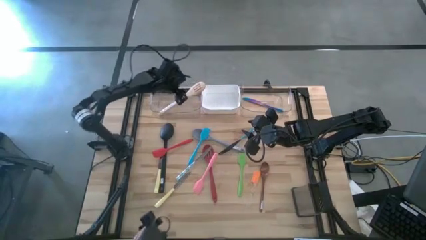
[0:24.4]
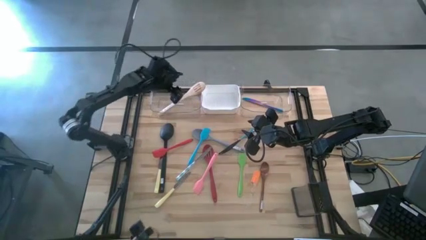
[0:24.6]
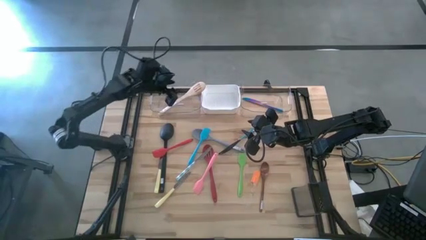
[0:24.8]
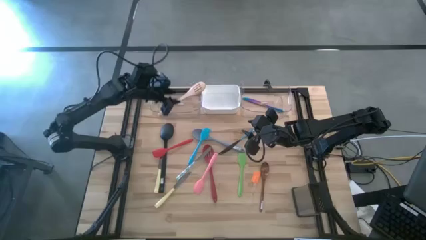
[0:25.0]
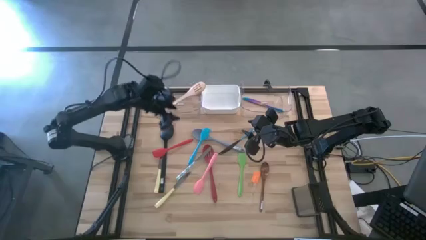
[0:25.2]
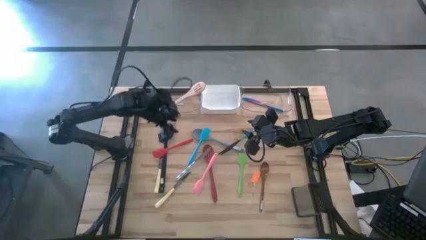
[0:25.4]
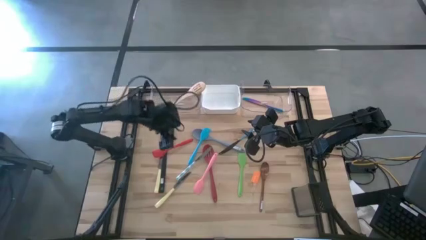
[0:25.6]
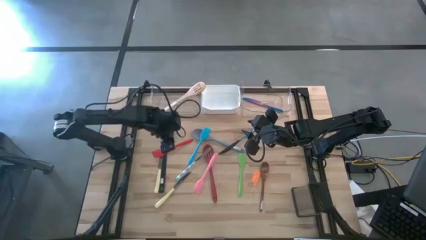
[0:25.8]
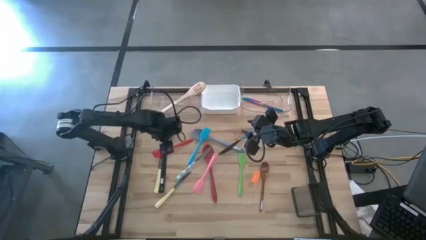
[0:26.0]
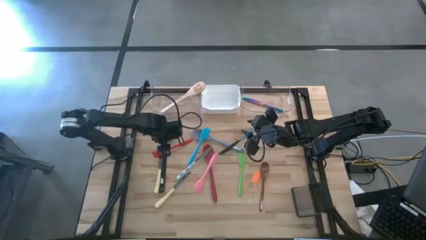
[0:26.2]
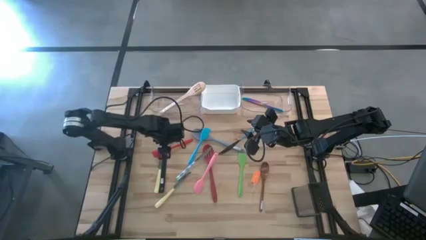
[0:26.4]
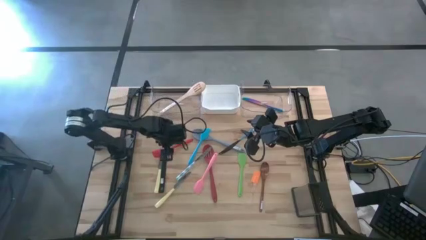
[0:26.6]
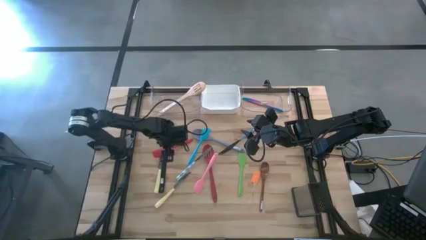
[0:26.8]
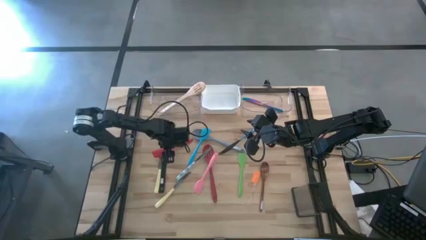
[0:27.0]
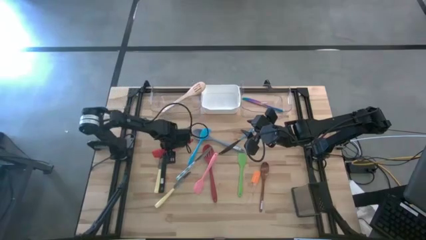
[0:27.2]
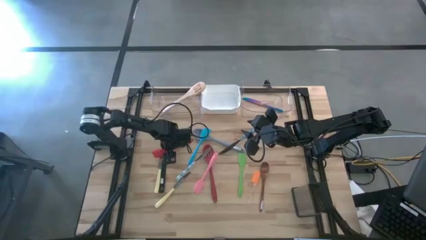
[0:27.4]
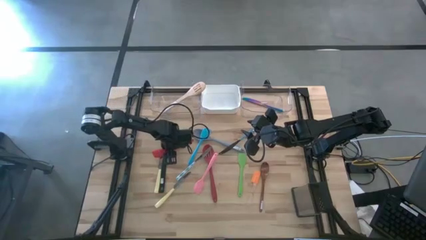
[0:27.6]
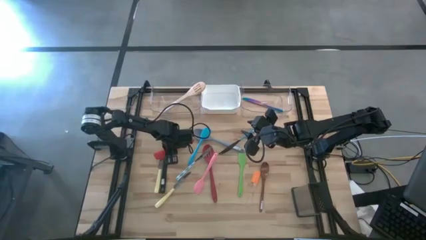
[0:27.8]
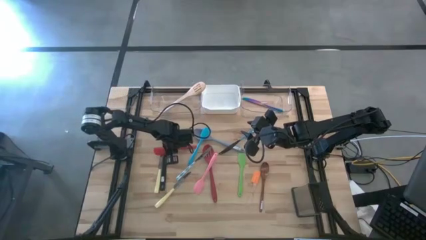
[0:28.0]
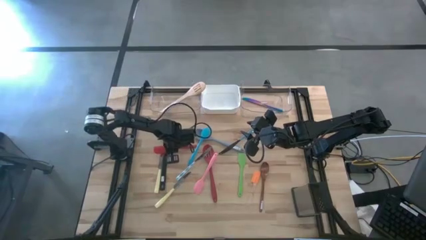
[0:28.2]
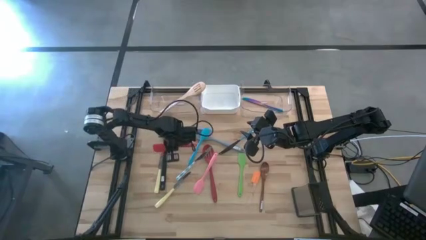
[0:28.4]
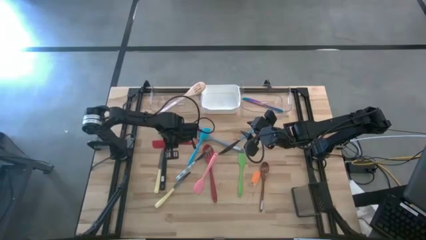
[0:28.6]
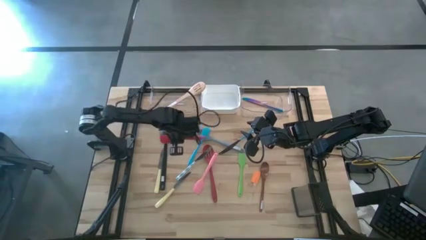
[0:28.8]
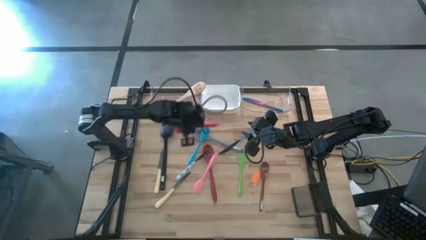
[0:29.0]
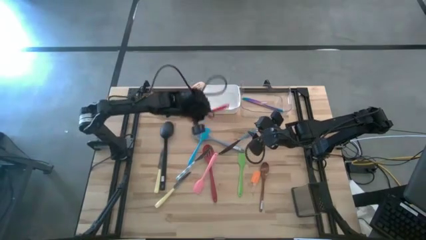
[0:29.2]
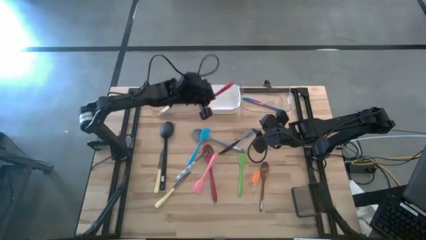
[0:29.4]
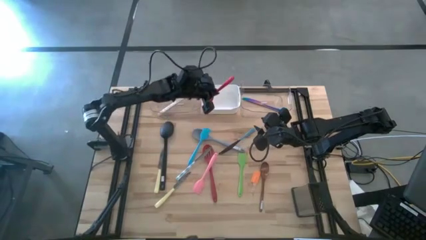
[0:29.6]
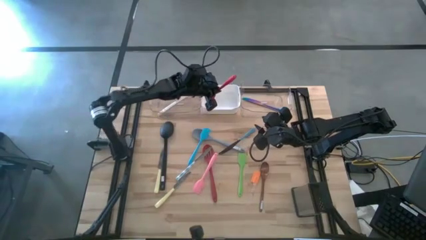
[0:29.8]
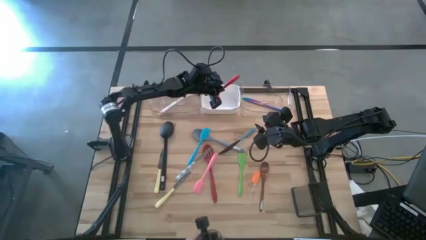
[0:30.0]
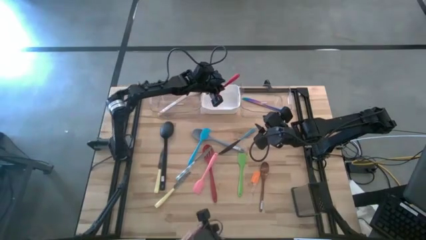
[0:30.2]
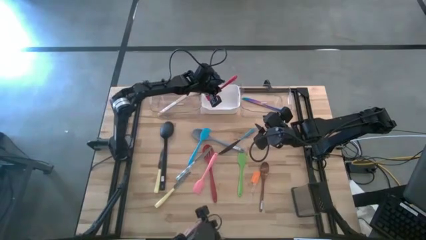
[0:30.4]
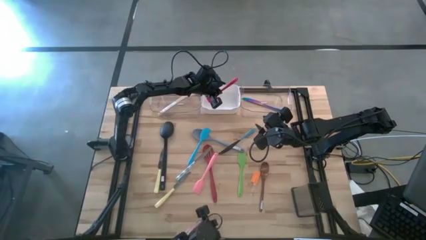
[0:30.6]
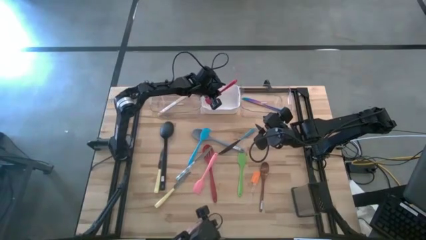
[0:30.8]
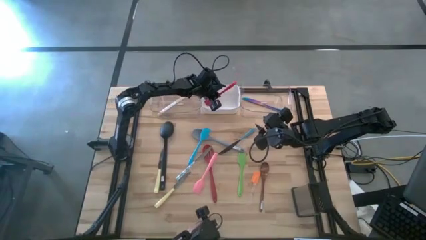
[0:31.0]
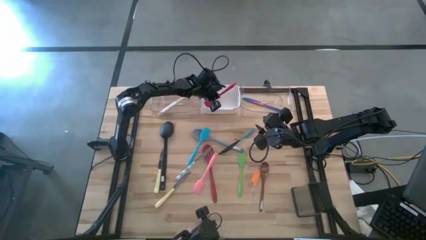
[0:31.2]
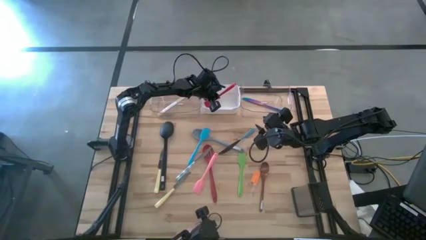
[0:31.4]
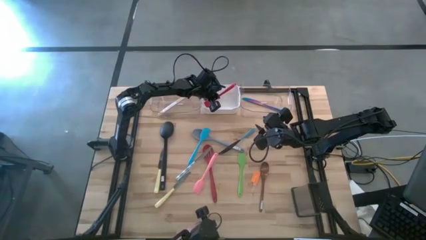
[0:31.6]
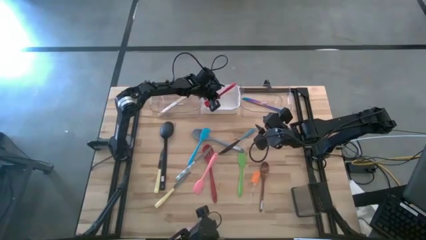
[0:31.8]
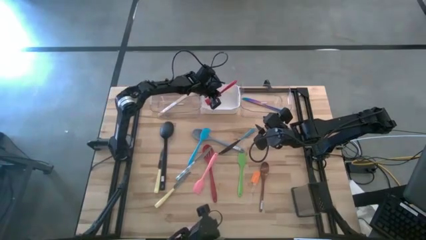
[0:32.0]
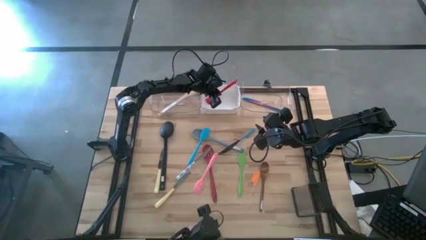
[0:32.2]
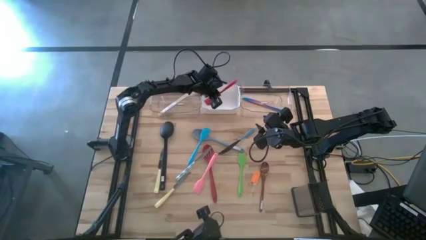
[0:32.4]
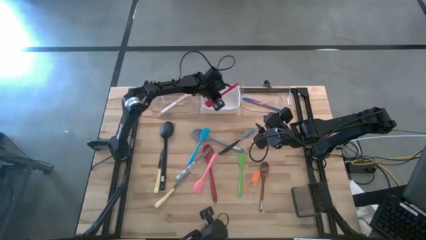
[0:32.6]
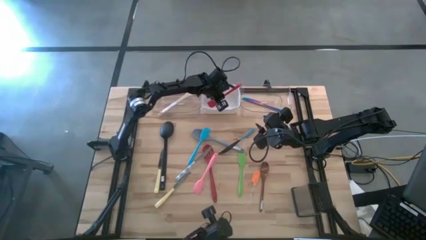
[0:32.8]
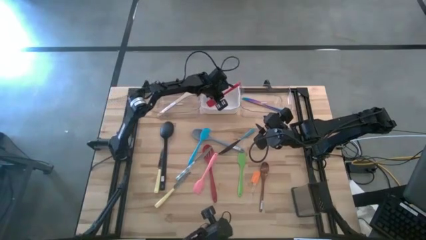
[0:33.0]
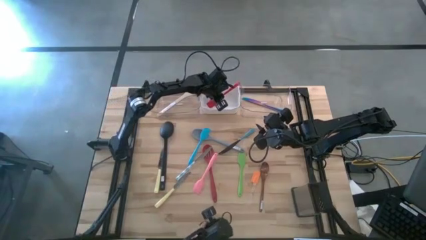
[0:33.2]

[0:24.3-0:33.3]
Task: Pick & Place Kitchen Items
Put the red spatula into the white bin

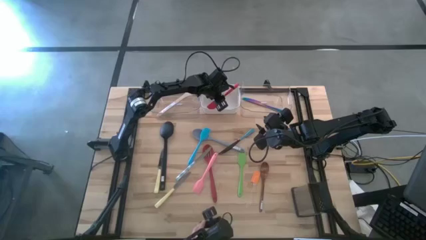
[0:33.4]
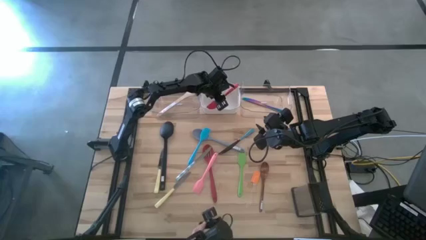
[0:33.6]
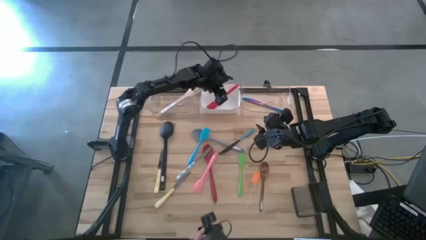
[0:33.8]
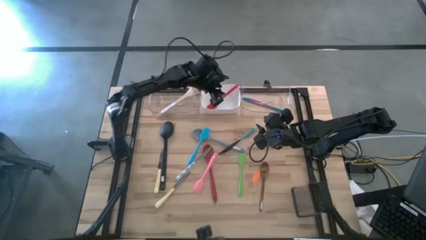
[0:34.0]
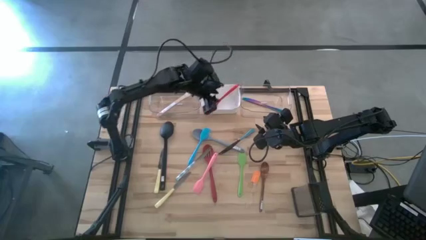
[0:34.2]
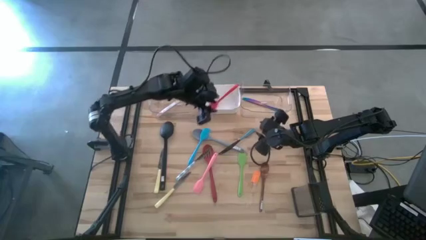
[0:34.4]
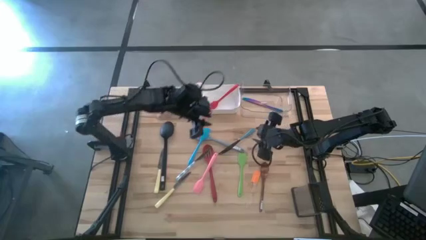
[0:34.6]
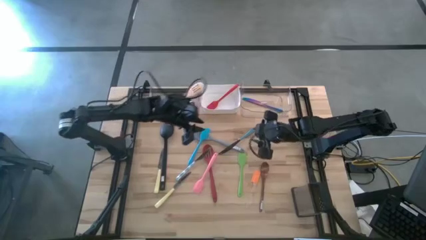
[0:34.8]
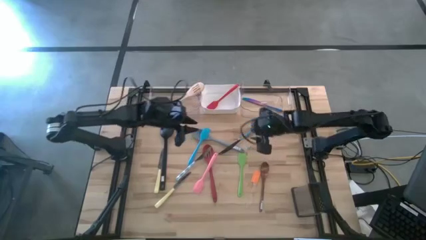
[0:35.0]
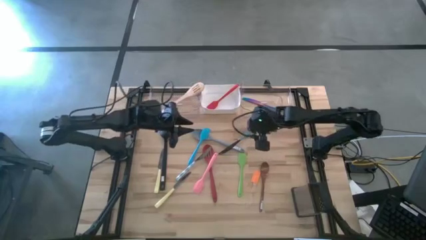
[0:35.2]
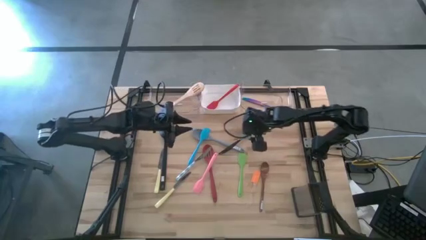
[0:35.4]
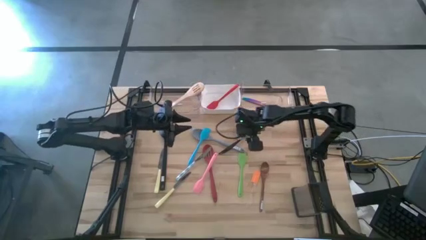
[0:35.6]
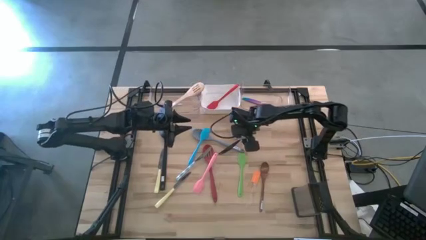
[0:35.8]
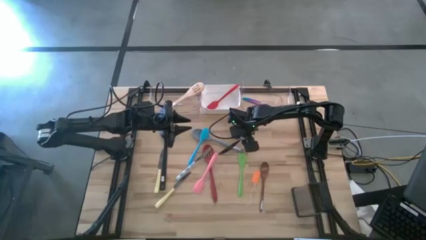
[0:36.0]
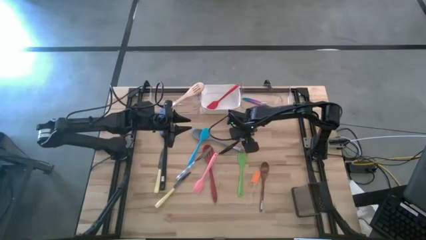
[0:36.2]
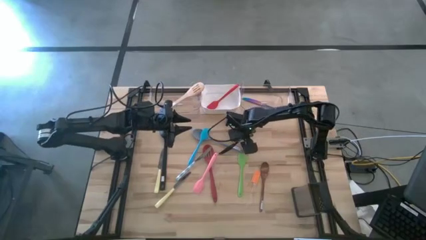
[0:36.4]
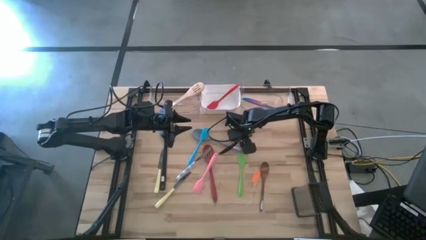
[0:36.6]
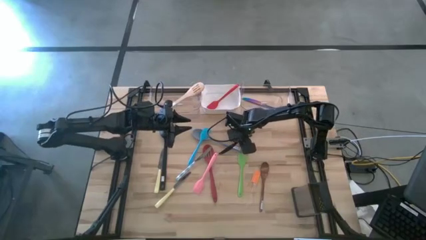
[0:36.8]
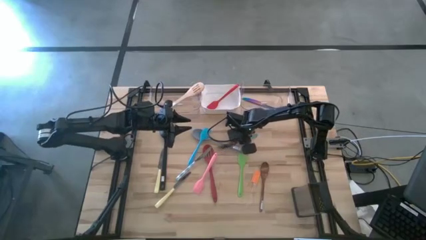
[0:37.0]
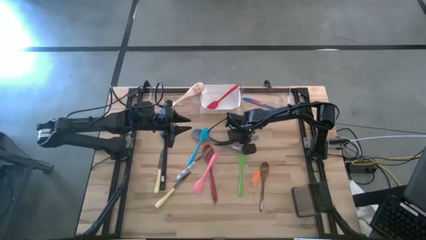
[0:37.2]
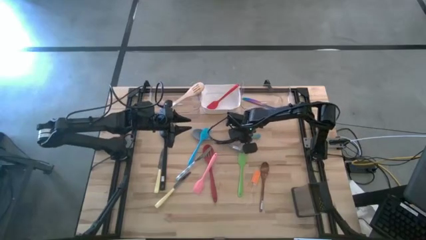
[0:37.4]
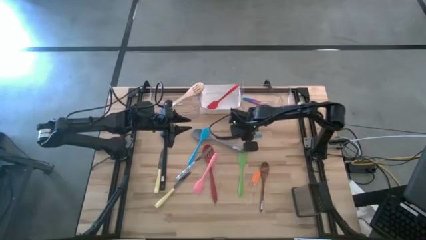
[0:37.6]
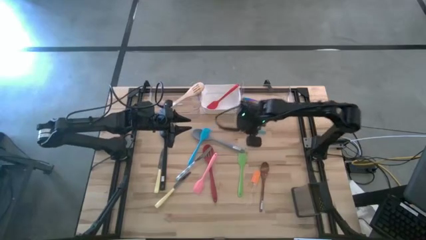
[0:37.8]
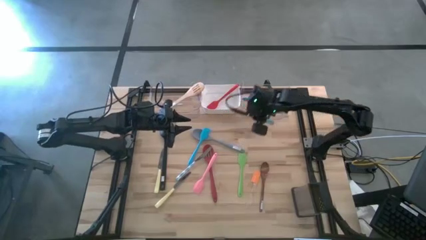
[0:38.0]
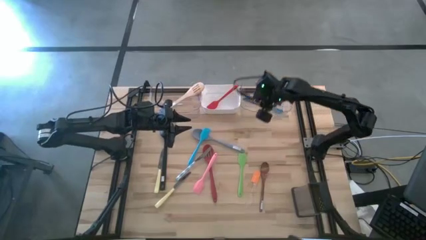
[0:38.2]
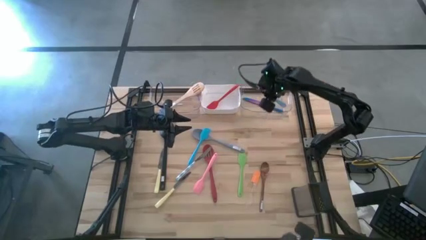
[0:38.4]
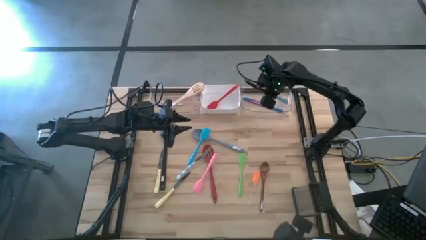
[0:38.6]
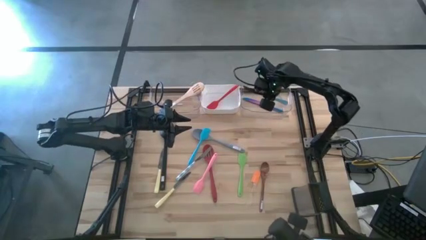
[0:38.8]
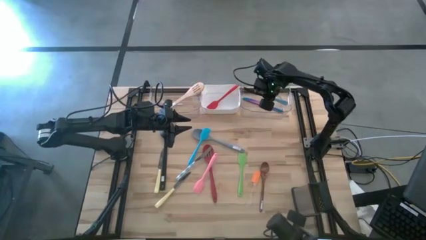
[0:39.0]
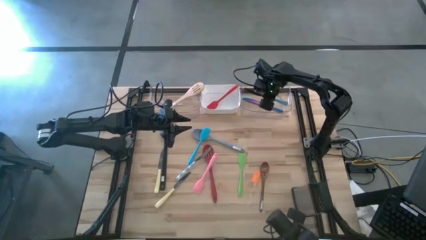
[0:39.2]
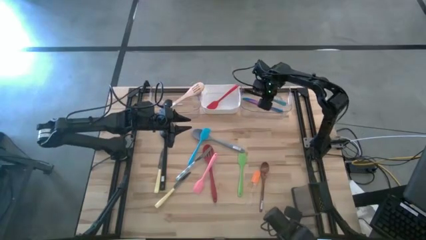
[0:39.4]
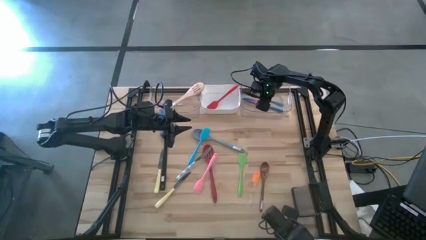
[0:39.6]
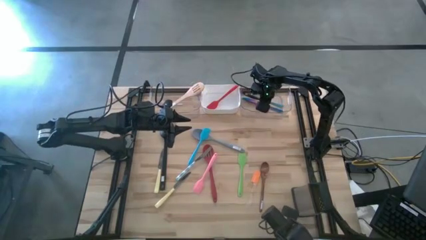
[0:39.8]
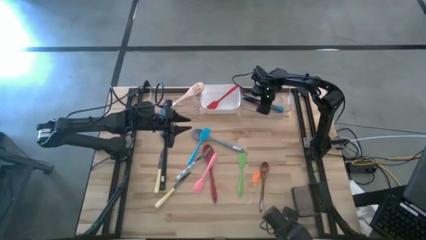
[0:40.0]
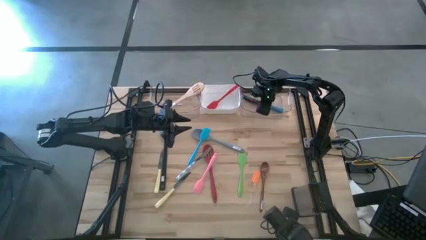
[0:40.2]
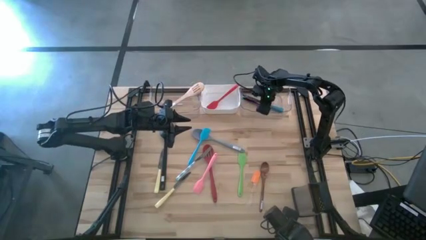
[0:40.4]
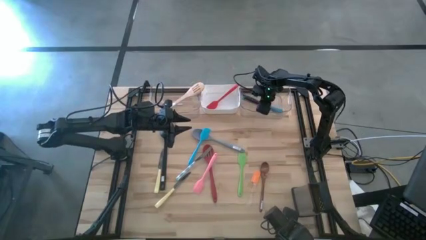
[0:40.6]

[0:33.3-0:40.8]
Put the blue table knife into the right transparent bin
